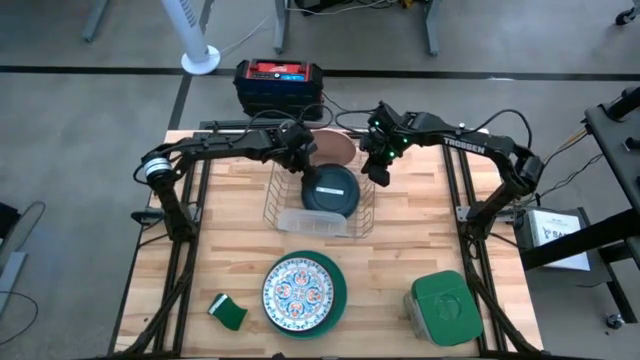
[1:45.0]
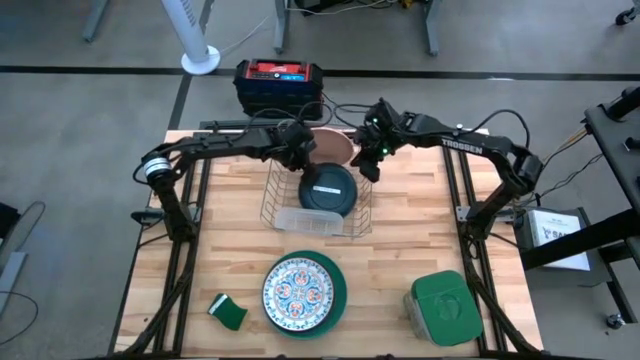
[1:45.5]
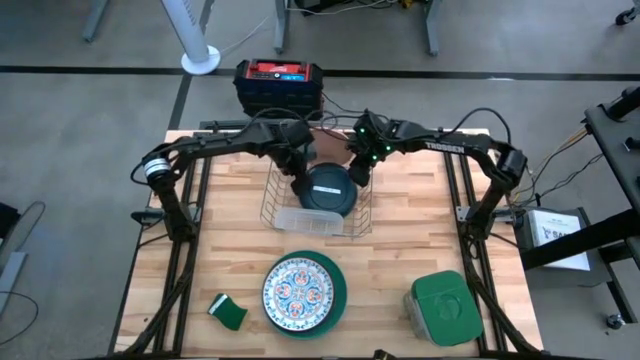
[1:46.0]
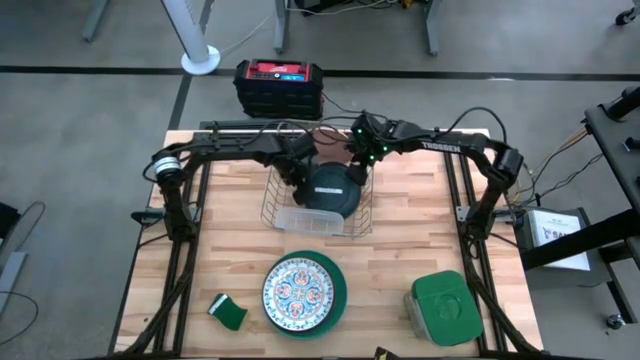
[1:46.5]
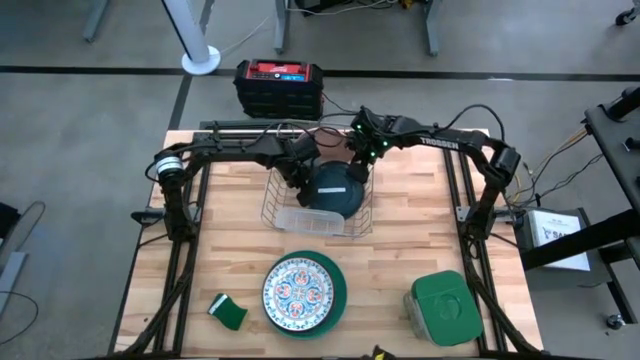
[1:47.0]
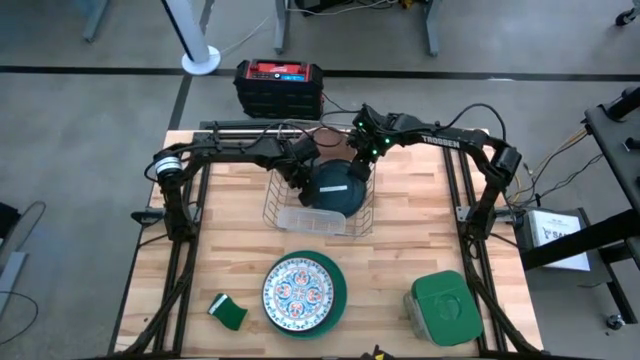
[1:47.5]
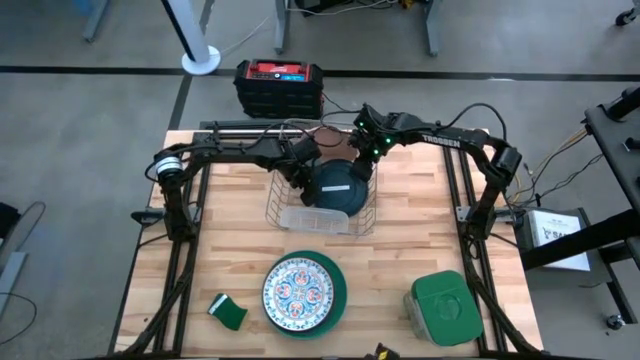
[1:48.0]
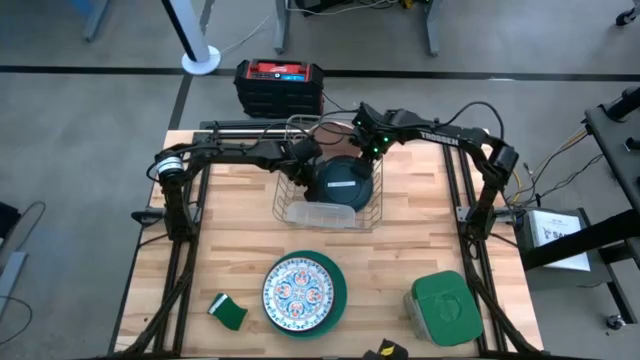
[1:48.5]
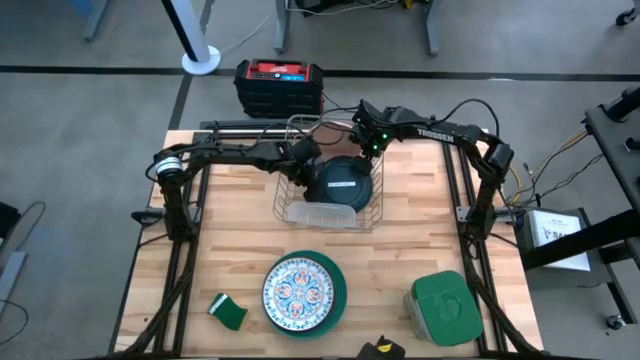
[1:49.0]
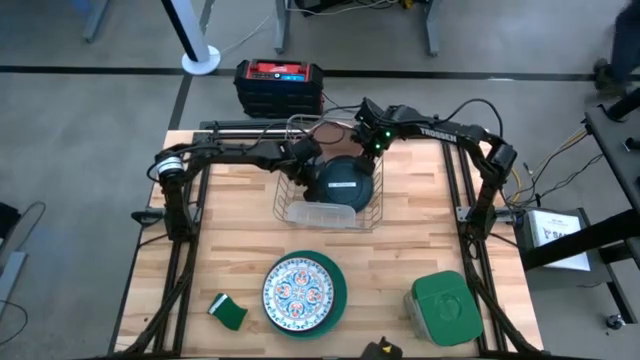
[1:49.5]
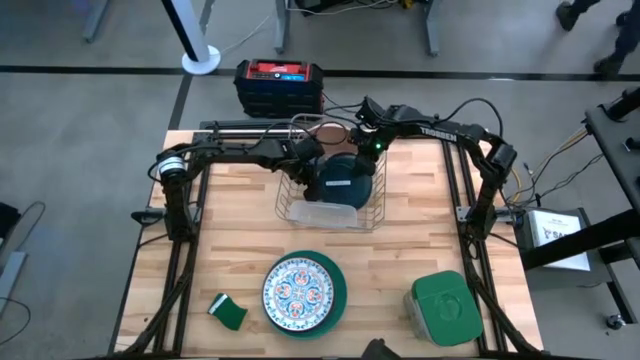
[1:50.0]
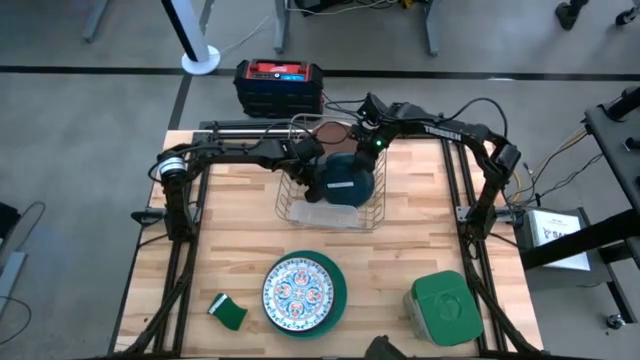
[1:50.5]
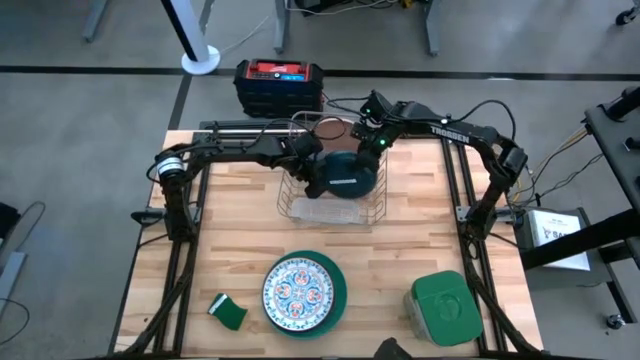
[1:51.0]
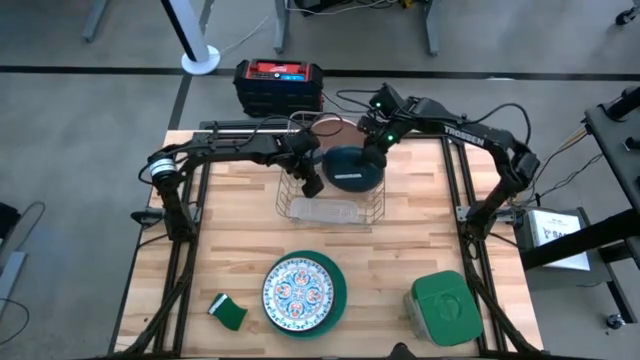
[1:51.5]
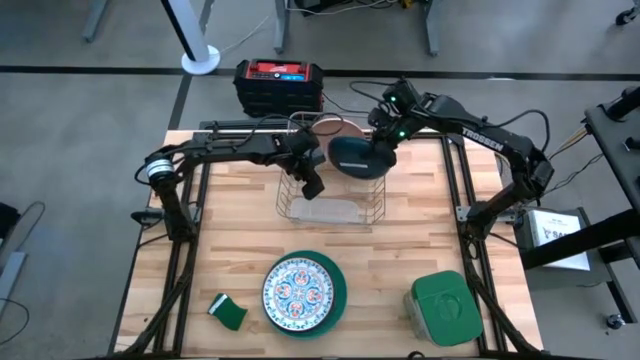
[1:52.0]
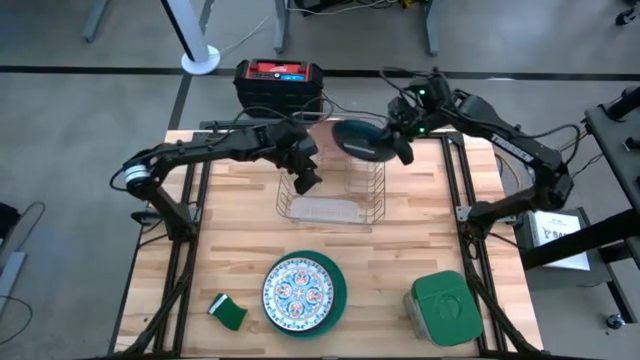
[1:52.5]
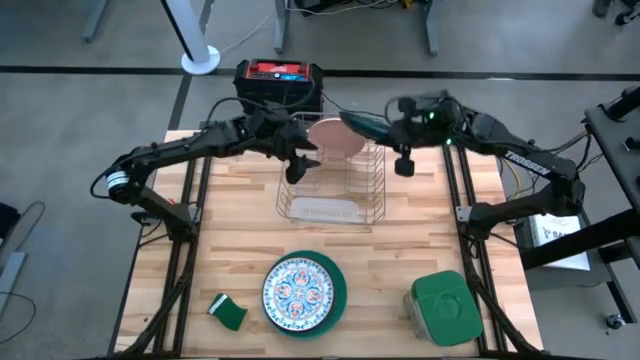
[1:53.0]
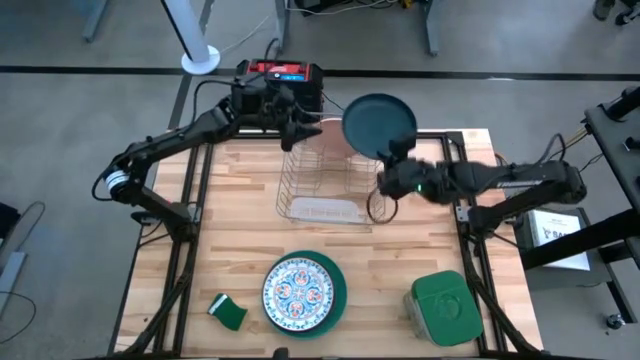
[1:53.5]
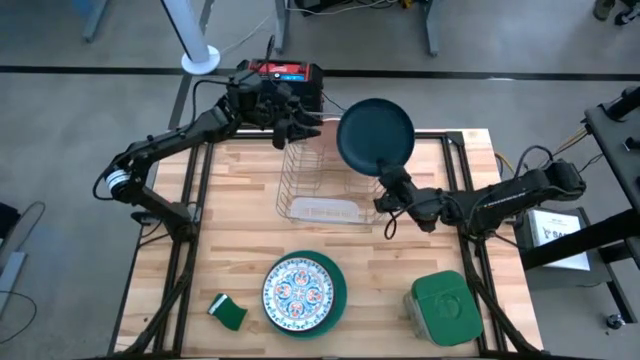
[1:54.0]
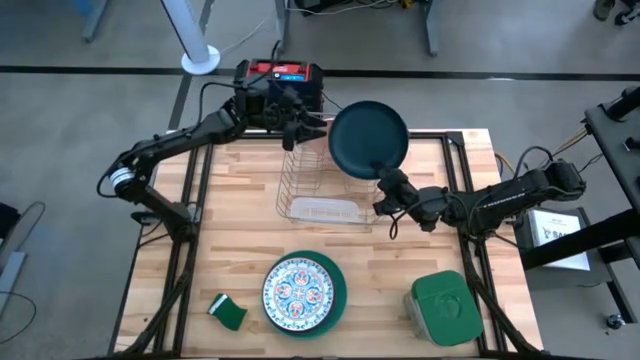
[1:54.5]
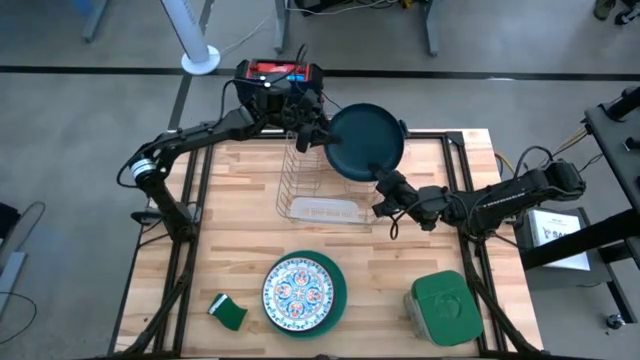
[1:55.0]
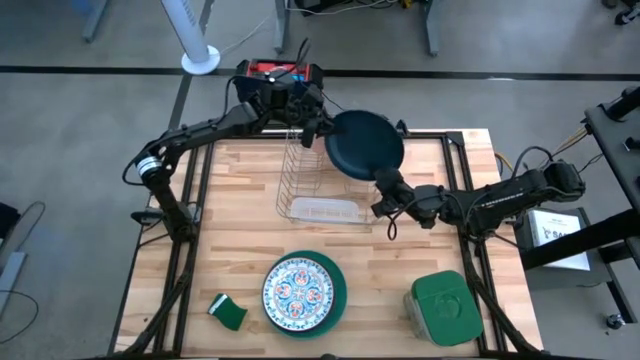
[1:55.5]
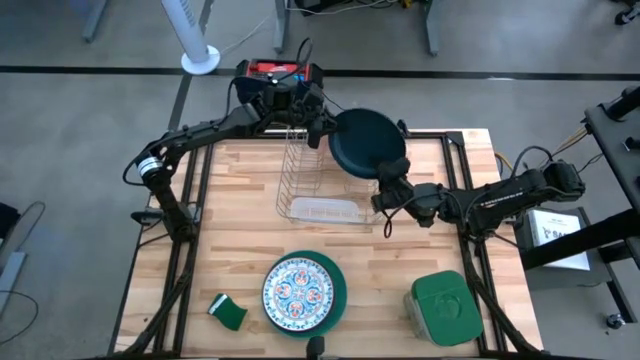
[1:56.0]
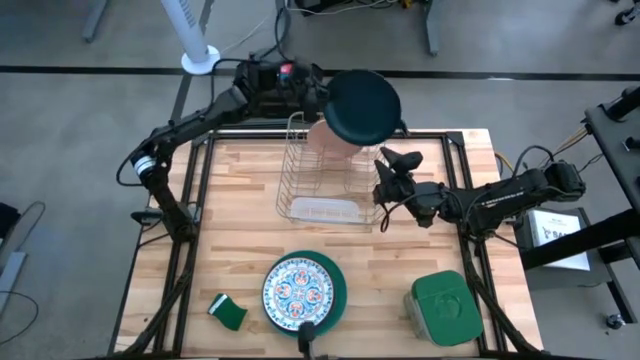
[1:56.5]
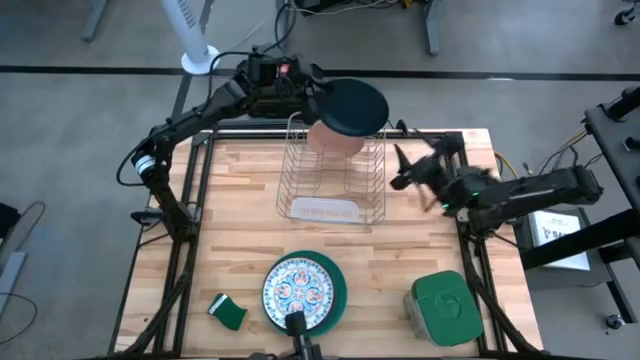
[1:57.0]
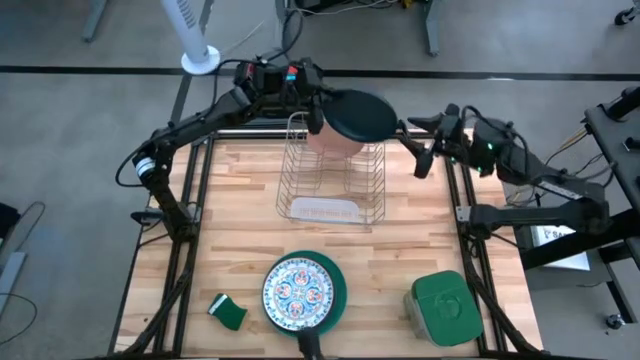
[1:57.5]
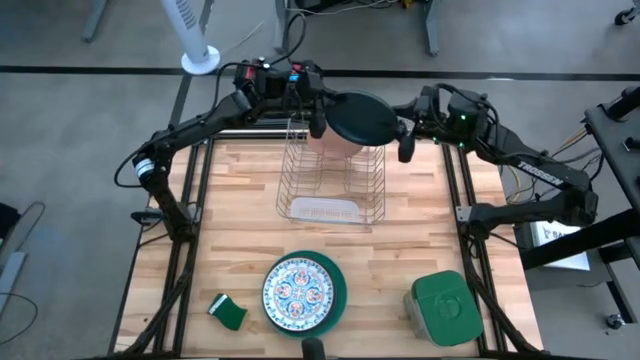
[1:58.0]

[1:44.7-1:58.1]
Task: Sort dishes
Put the dark green plate in the dishwasher rack

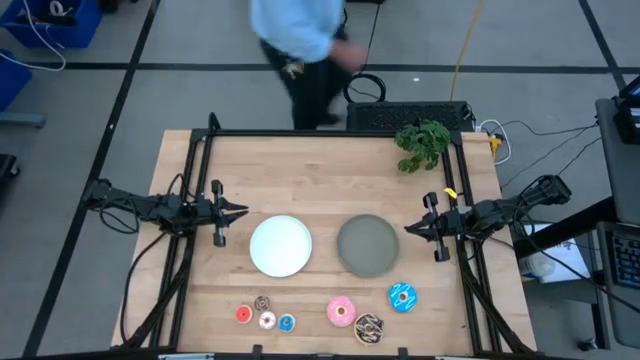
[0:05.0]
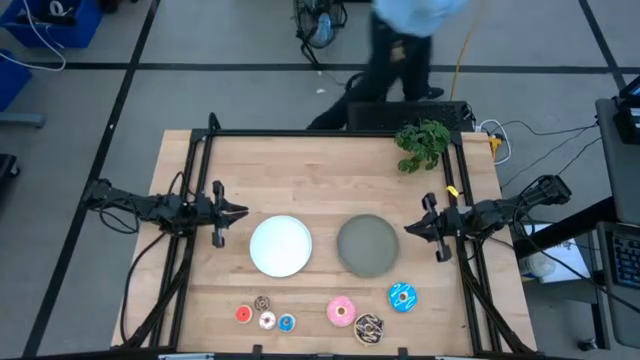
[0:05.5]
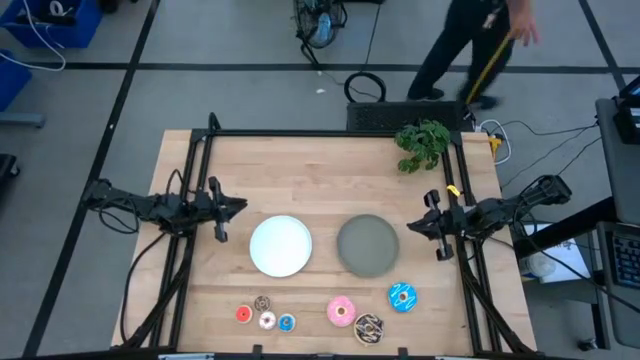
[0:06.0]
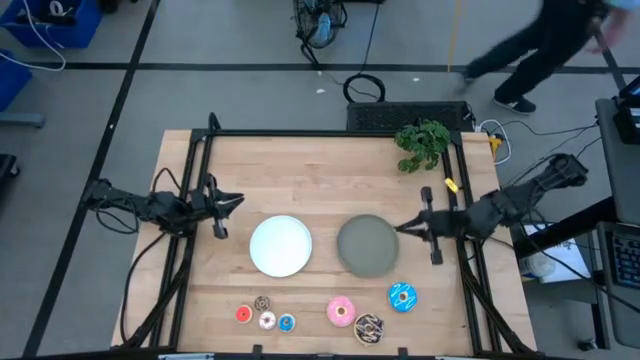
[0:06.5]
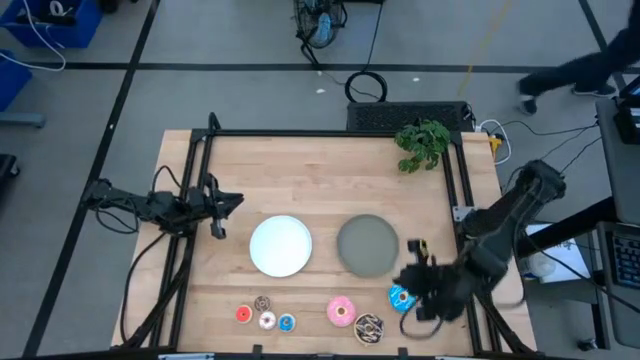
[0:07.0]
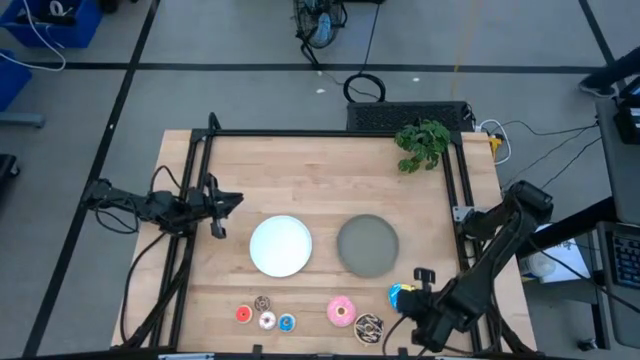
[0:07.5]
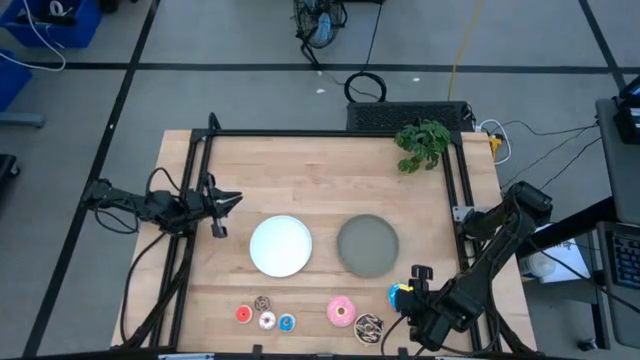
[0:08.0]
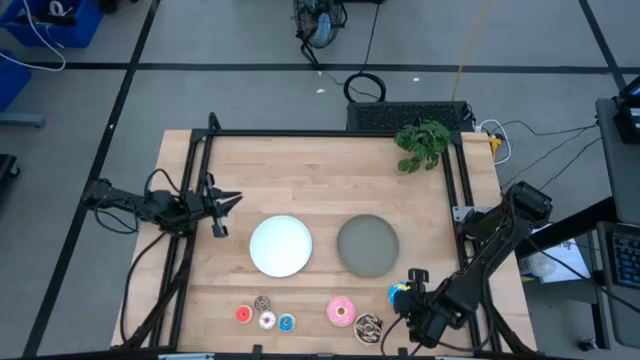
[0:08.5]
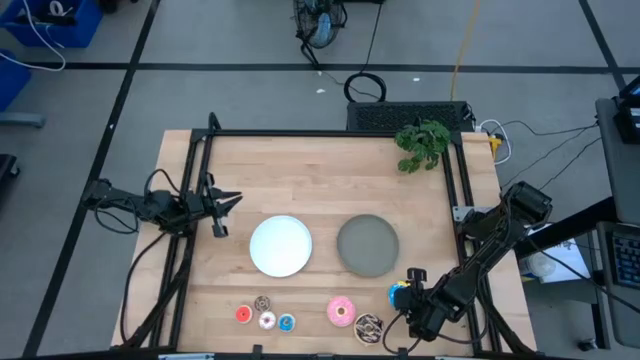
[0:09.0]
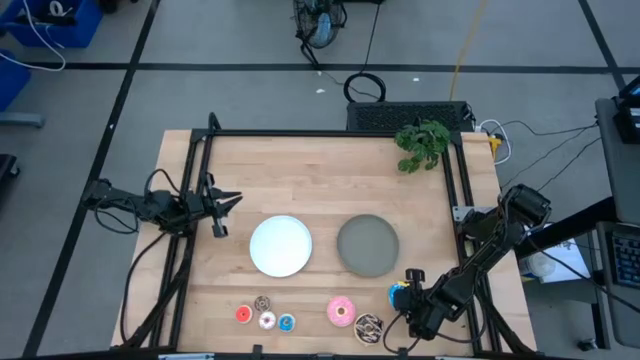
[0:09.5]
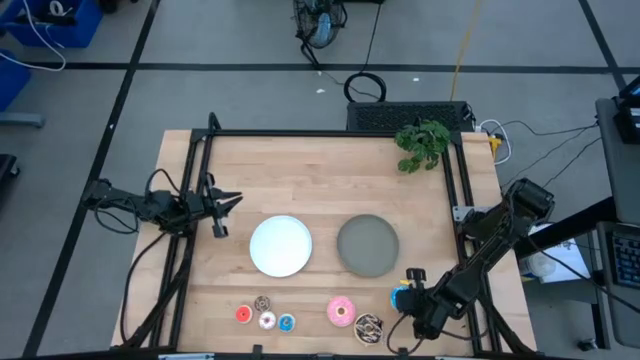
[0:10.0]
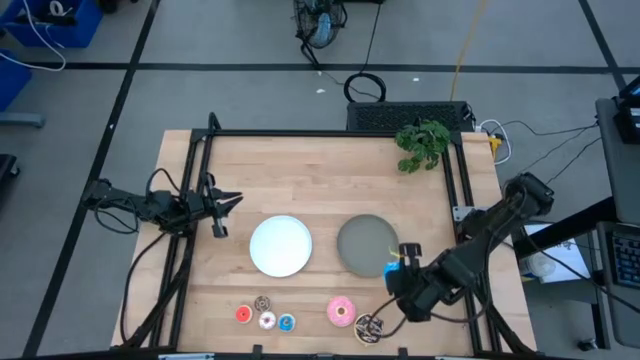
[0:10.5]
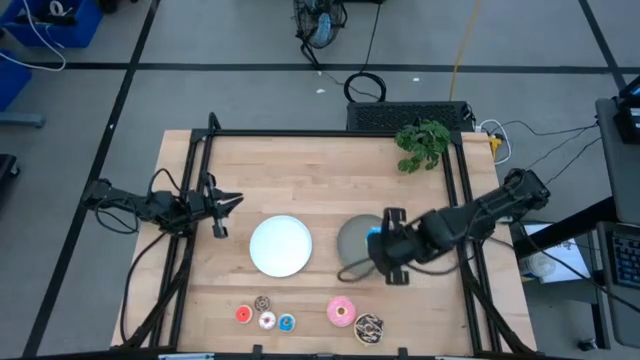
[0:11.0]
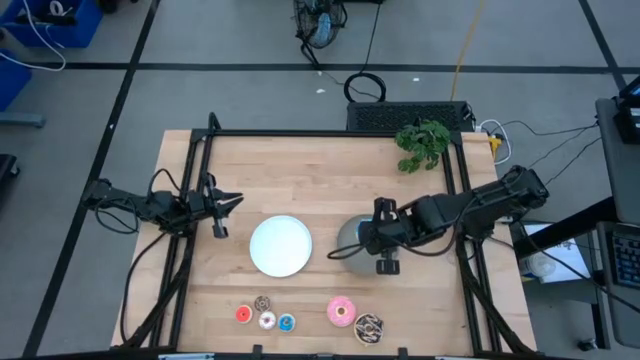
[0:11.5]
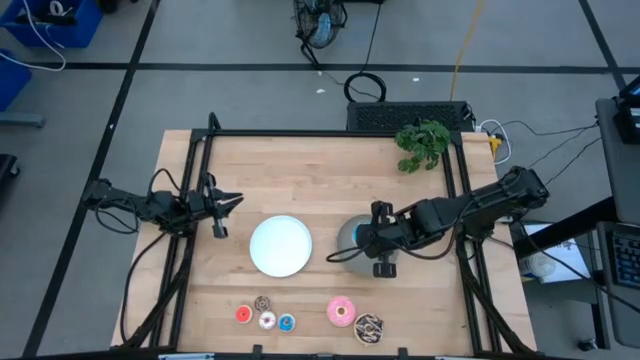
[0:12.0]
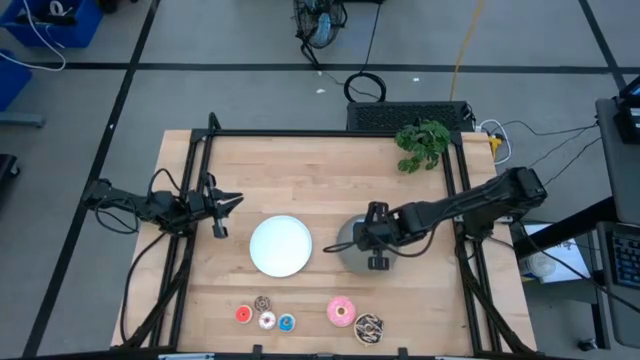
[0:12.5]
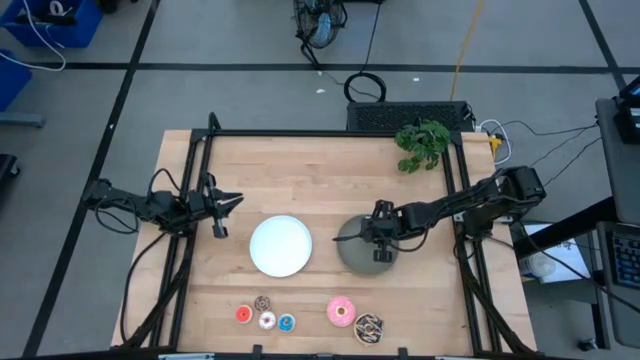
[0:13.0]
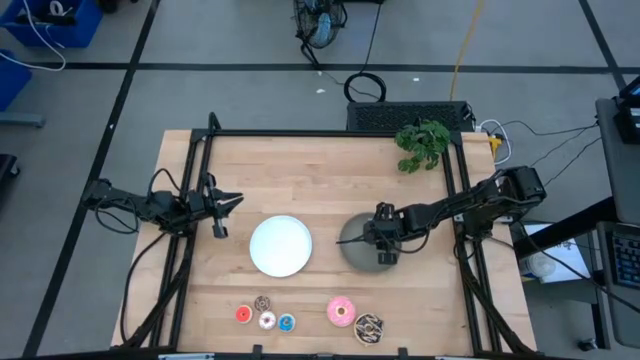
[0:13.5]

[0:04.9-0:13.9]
Task: Pick & Place donuts
Put the large blue donut in the gray bin
